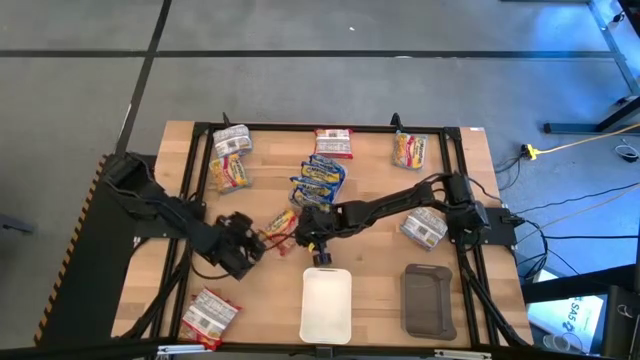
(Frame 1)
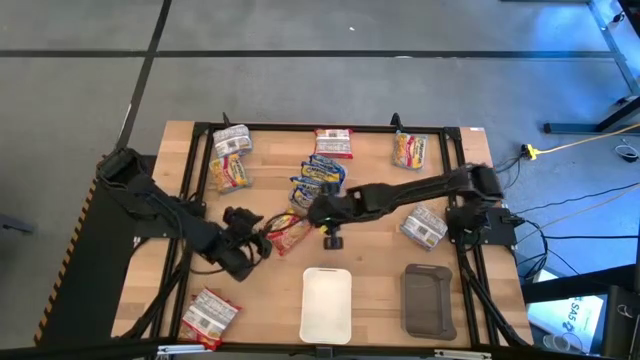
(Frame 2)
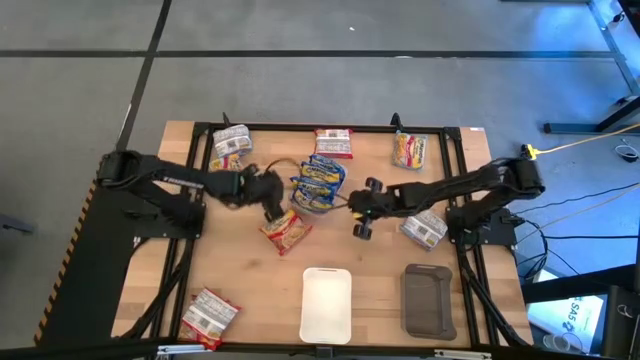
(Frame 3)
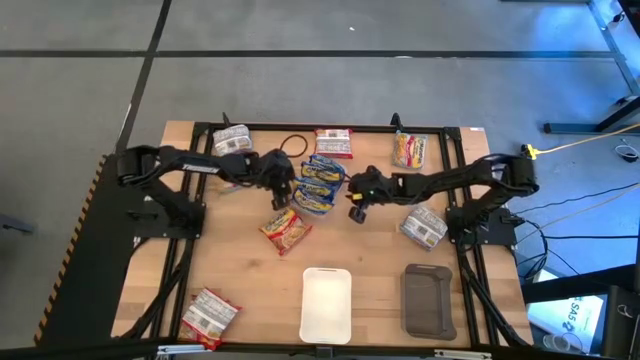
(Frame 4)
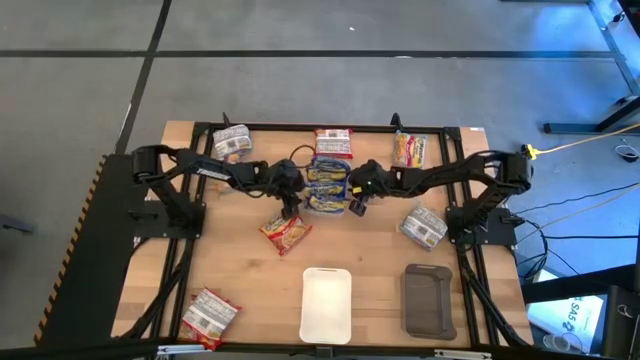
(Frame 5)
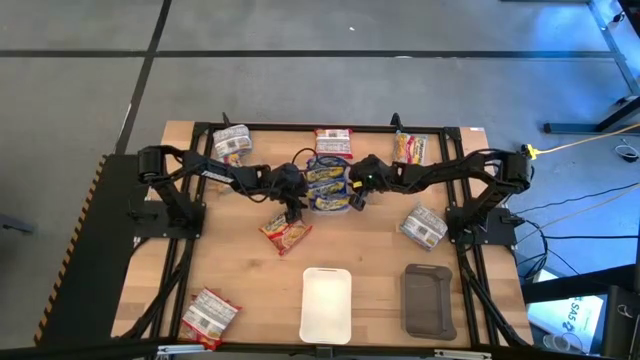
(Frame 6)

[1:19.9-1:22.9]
Task: Sort Maruchan noodles
Adjust the transparent bin

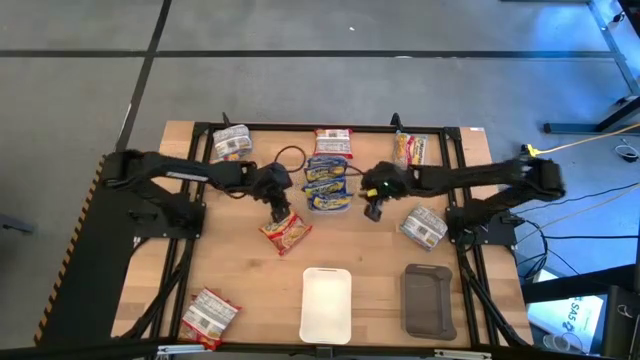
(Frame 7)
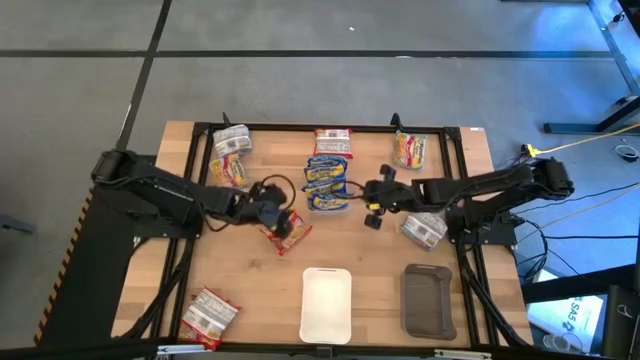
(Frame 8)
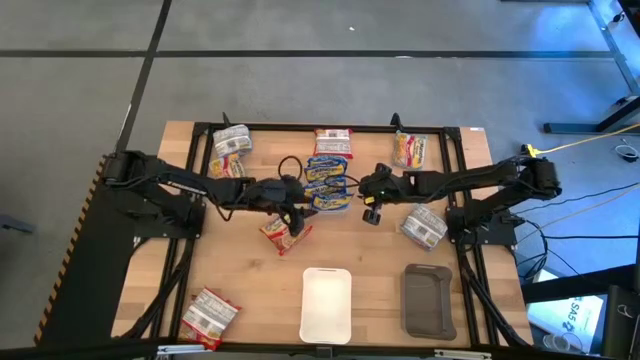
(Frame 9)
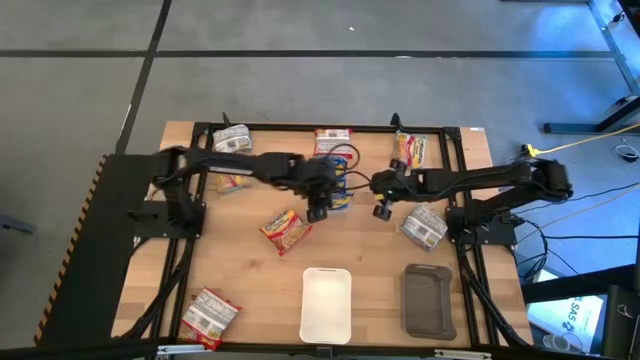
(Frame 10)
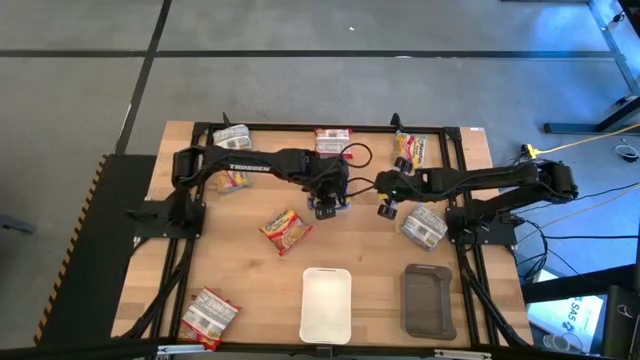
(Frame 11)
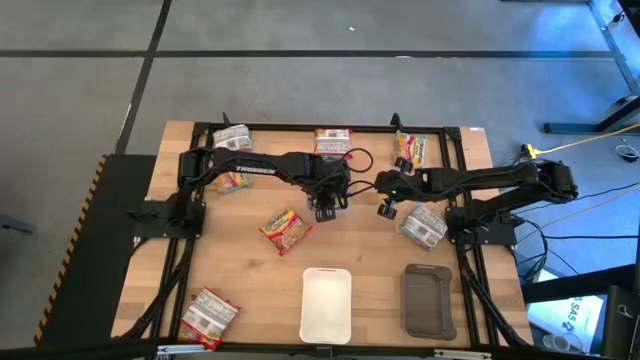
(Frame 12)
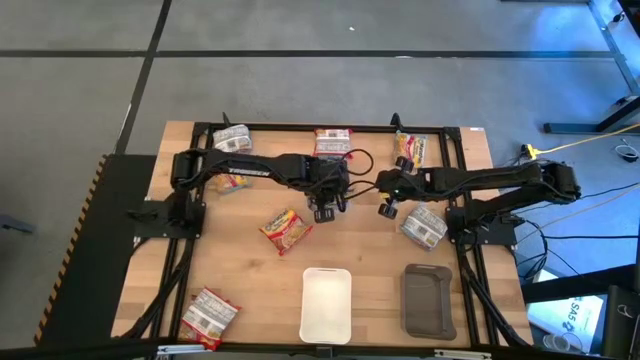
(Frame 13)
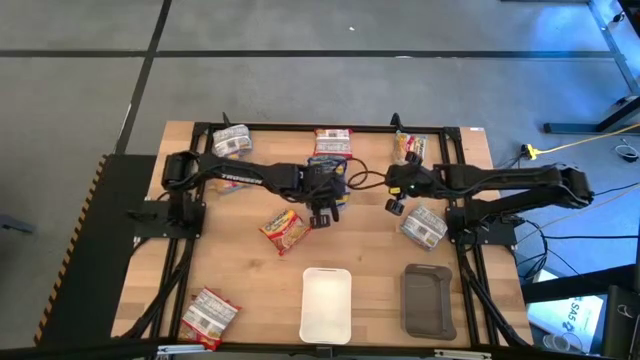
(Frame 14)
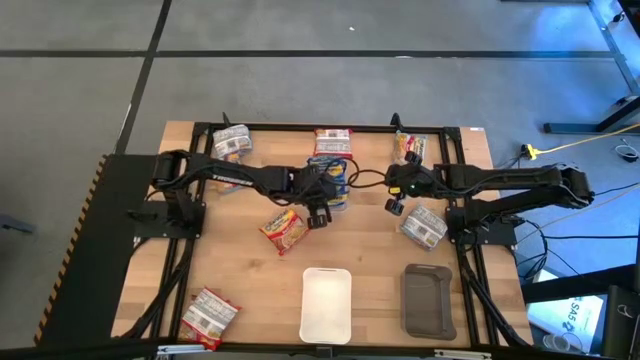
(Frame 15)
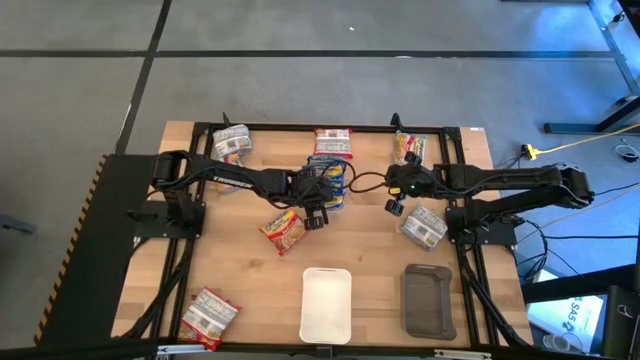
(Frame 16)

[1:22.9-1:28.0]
Adjust the blue noodle pack in the transparent bin

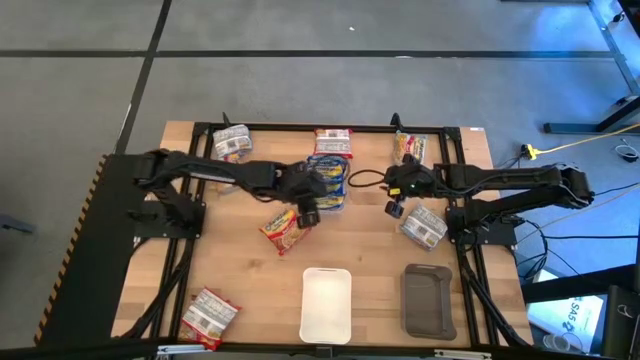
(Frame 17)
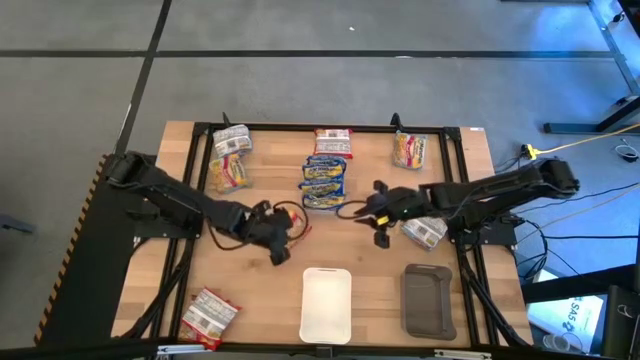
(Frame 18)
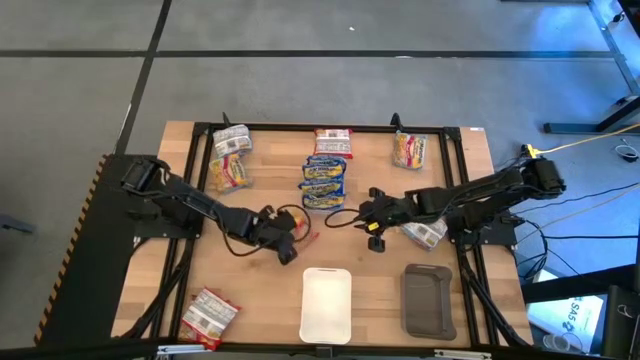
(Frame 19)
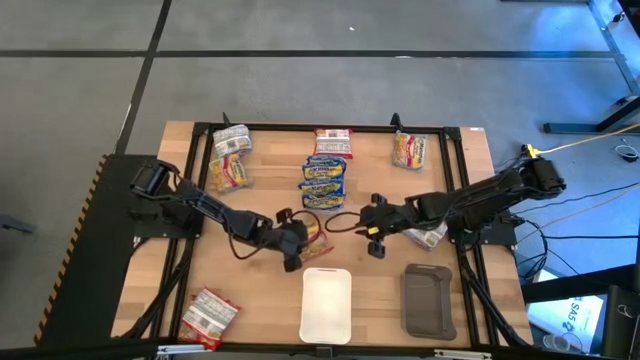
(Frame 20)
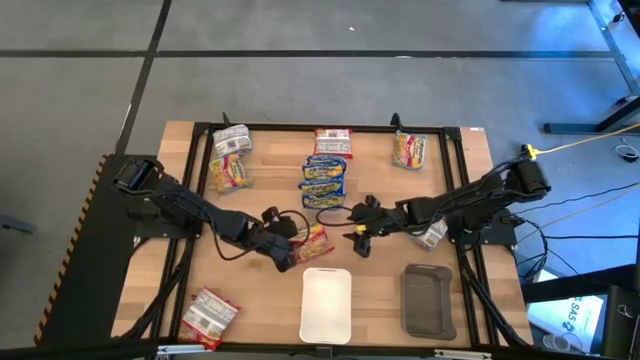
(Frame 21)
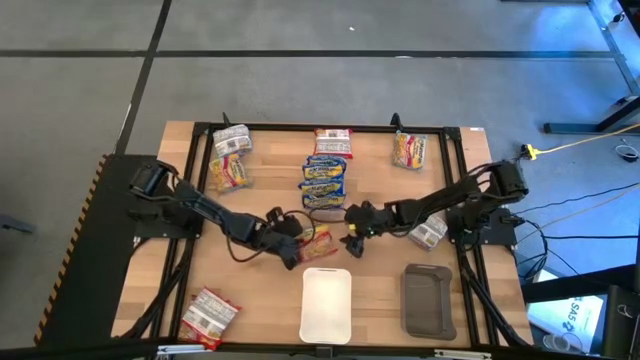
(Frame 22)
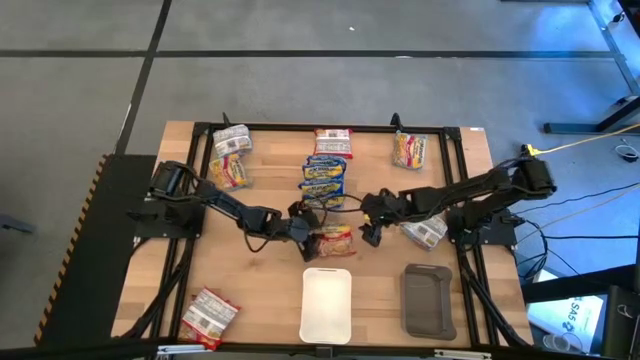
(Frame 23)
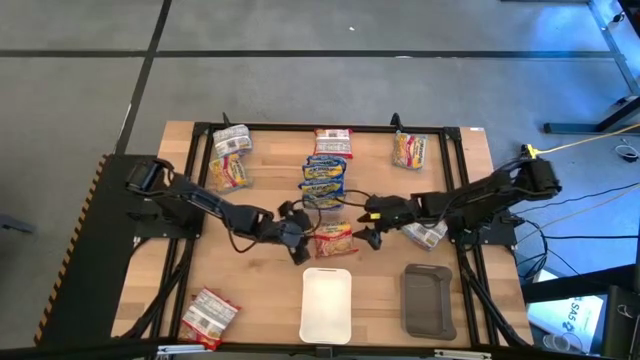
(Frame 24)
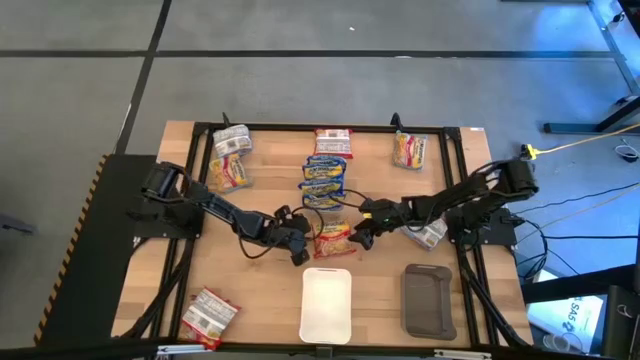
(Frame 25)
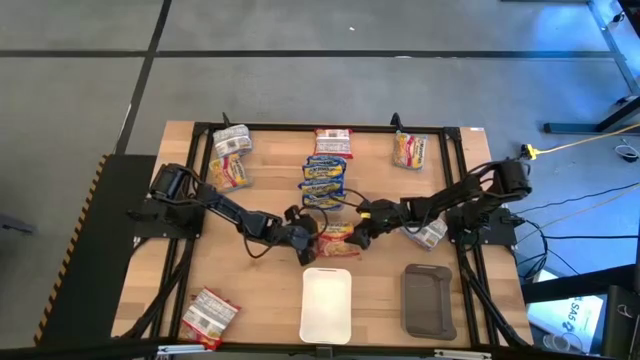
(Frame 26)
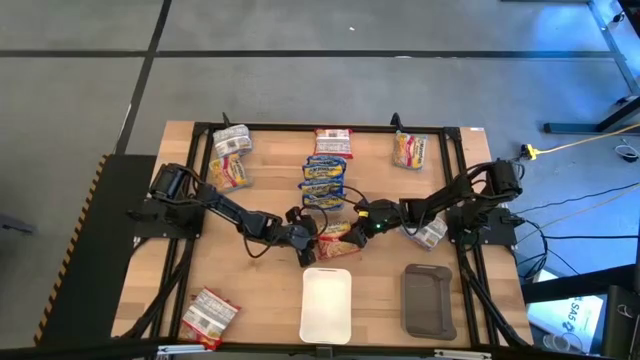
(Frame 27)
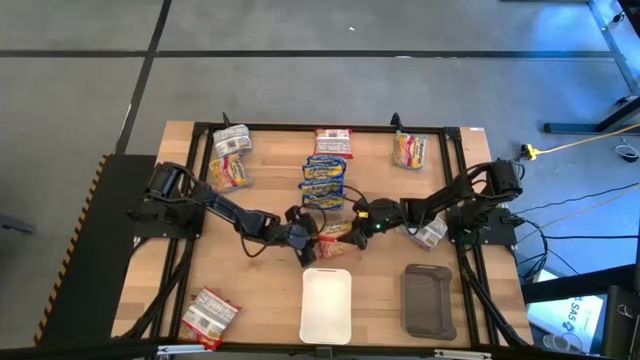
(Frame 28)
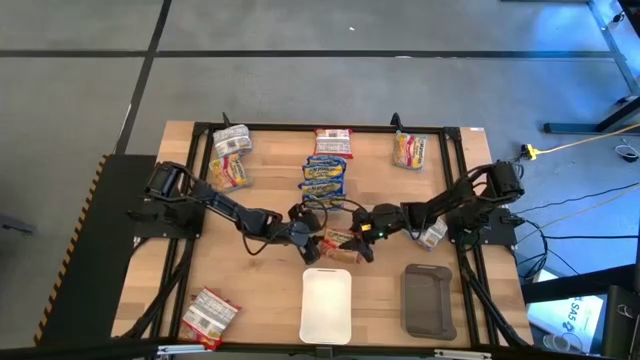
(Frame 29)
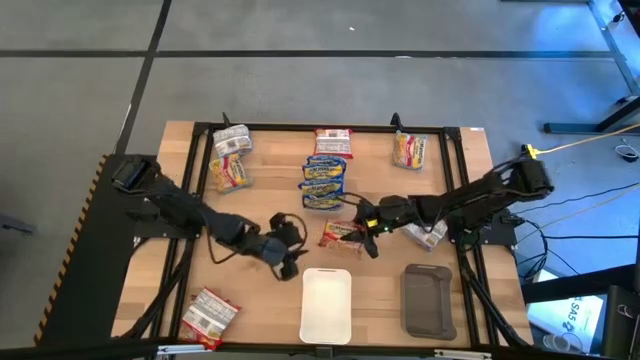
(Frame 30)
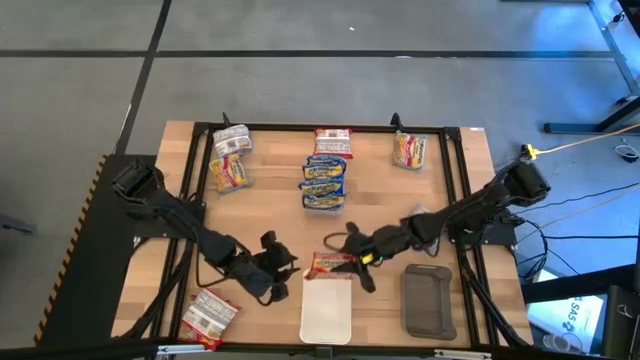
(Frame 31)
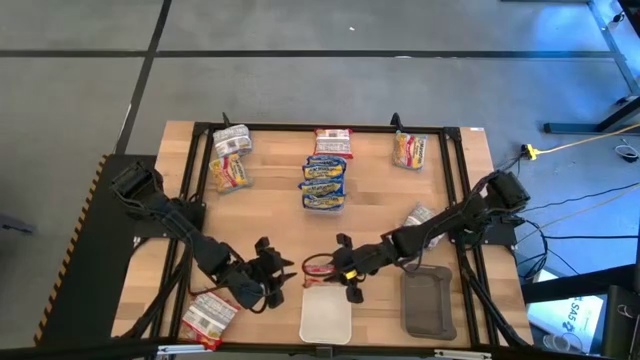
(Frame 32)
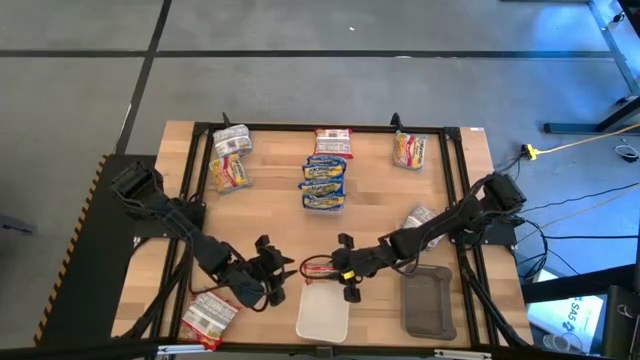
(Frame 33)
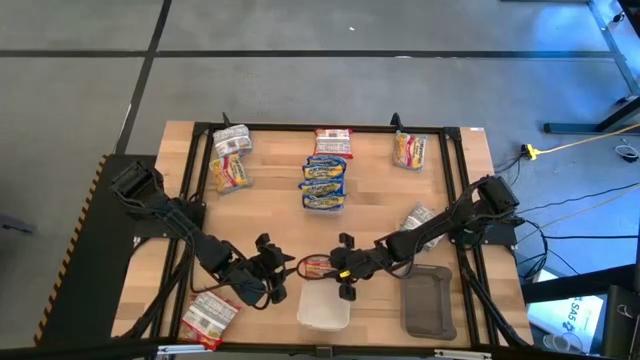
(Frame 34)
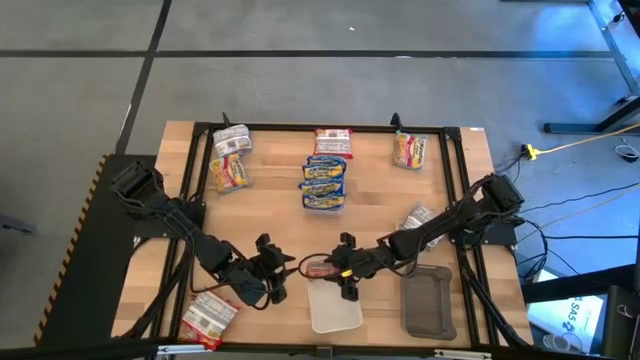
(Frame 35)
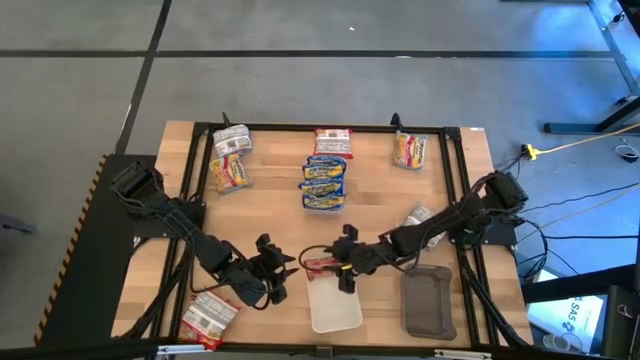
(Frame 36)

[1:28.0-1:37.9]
Put the red noodle pack into the white bin

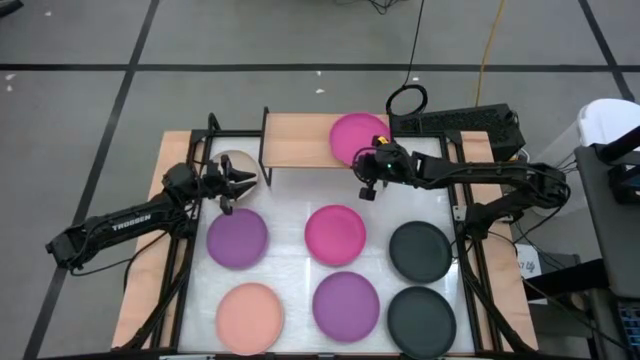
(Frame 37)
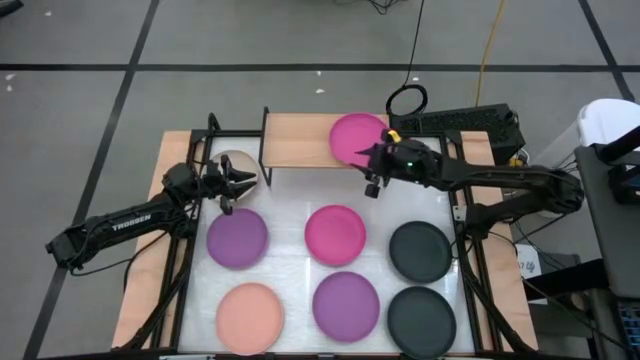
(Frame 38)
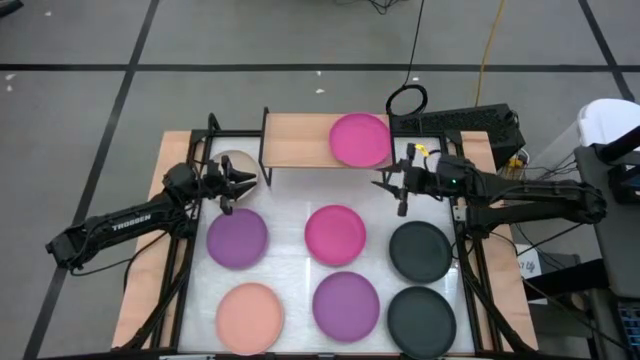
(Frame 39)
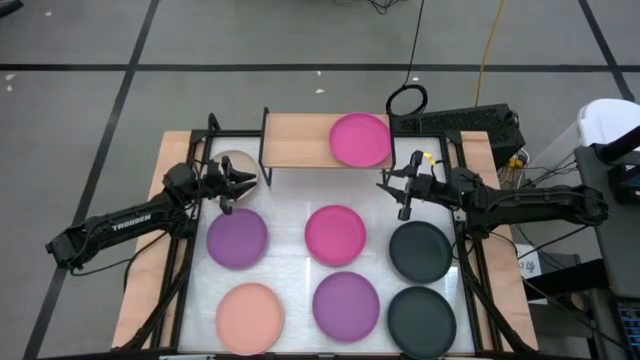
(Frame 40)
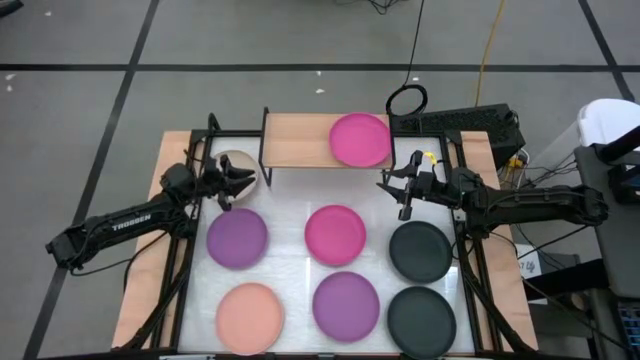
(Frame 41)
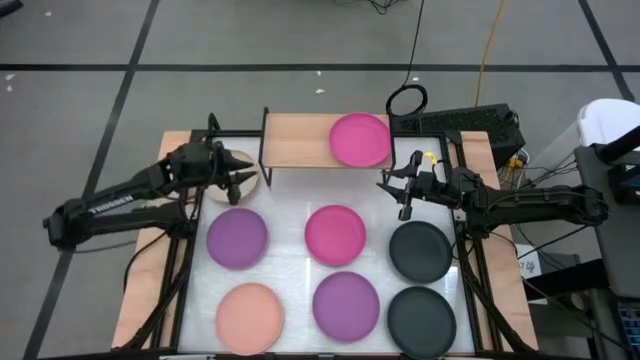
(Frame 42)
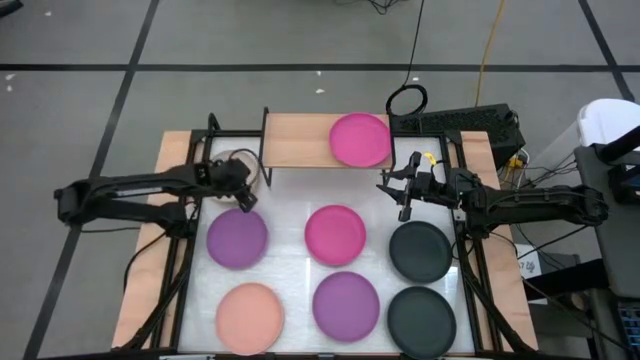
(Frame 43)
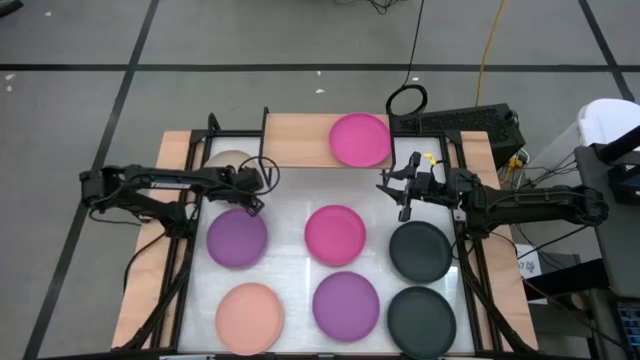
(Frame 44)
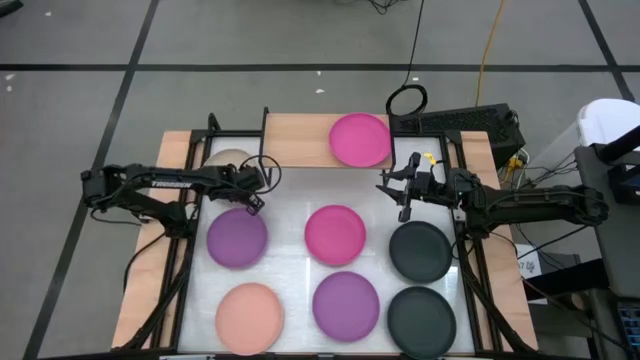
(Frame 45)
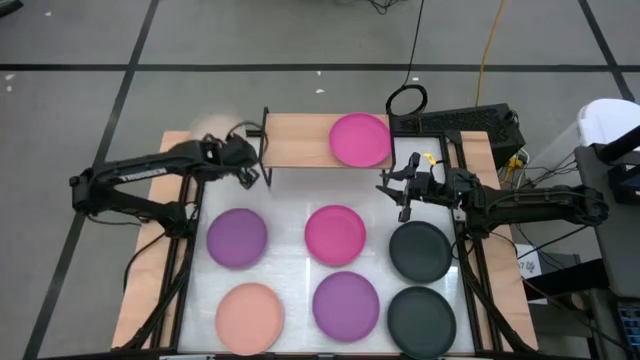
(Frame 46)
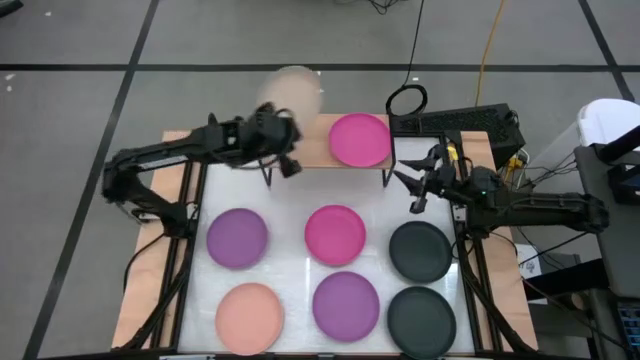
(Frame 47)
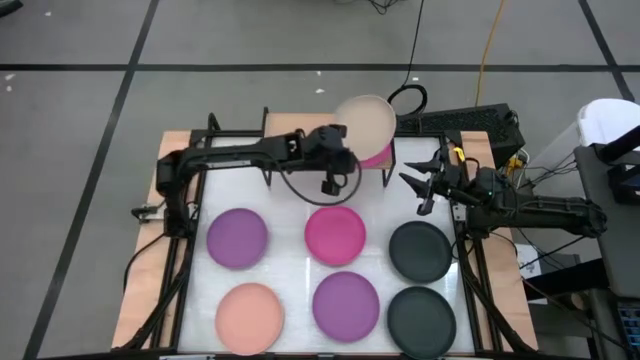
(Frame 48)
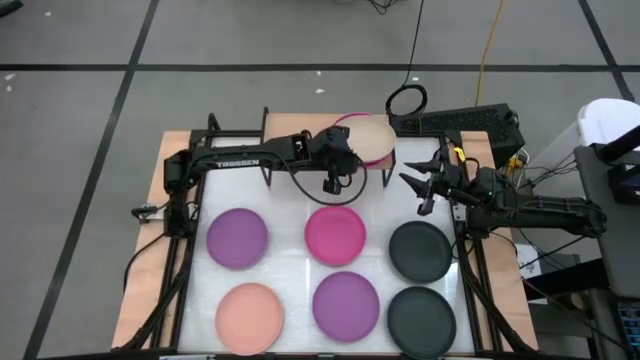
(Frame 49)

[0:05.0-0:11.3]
Task: Place and stack plates onto a shelf
Stack the light gray plate on top of the pink plate on the shelf
